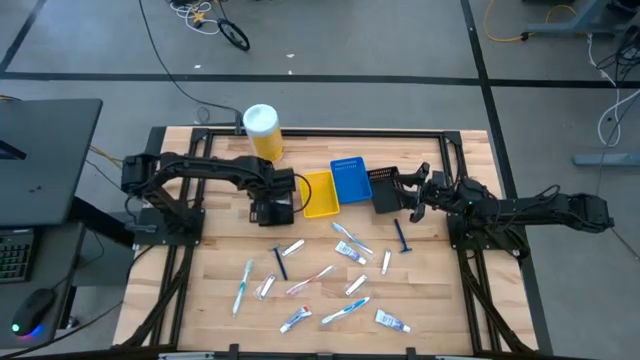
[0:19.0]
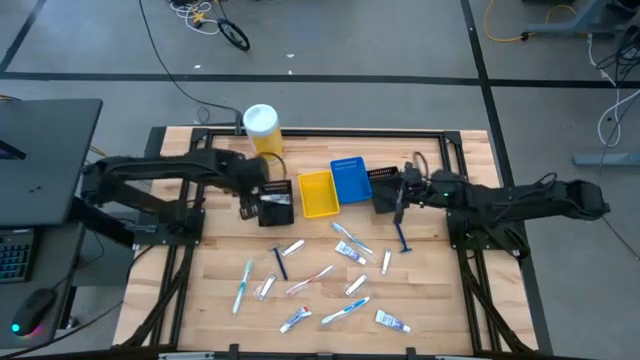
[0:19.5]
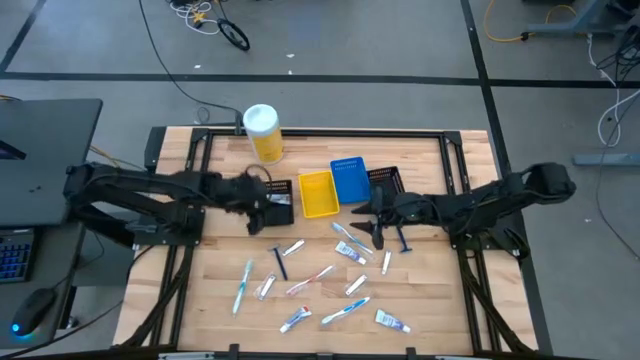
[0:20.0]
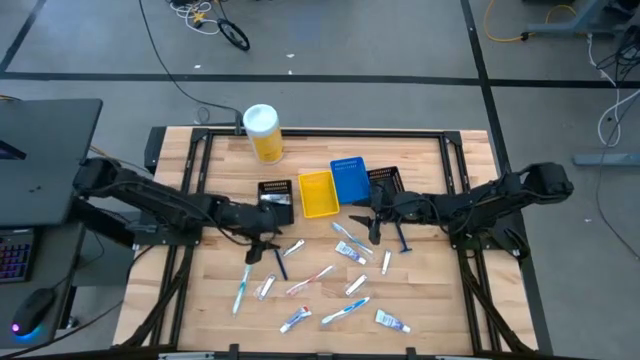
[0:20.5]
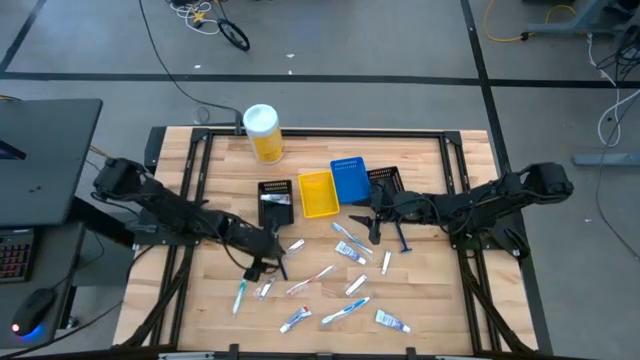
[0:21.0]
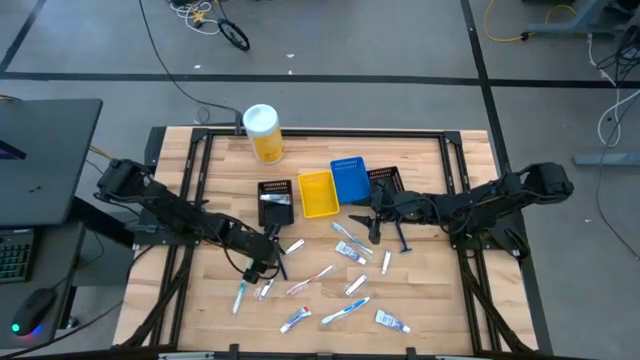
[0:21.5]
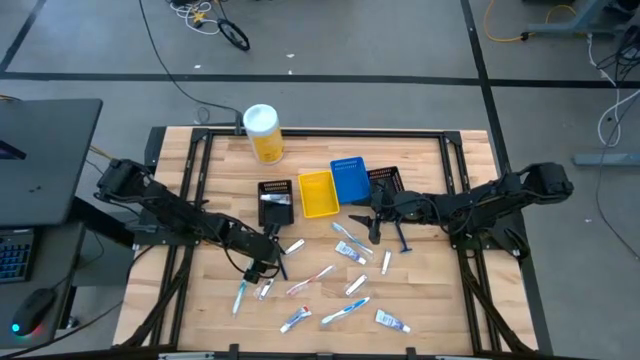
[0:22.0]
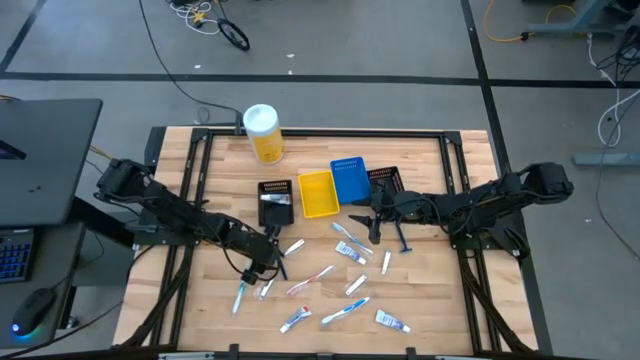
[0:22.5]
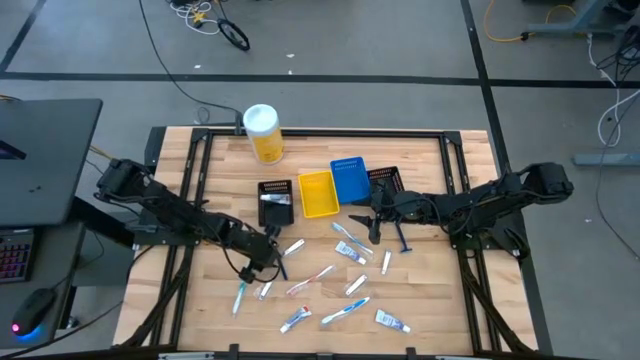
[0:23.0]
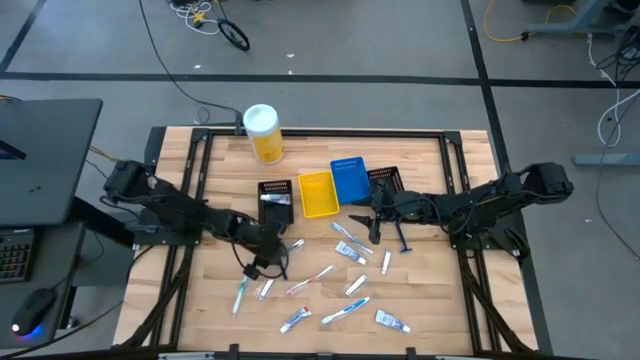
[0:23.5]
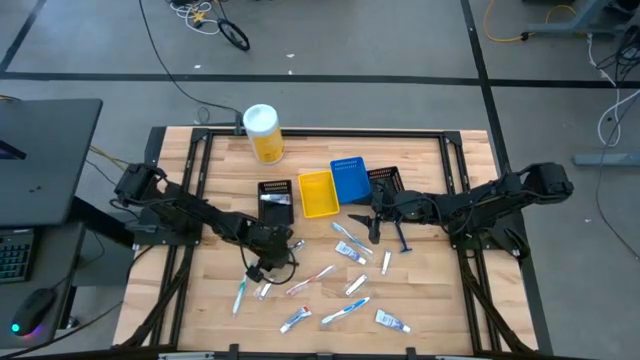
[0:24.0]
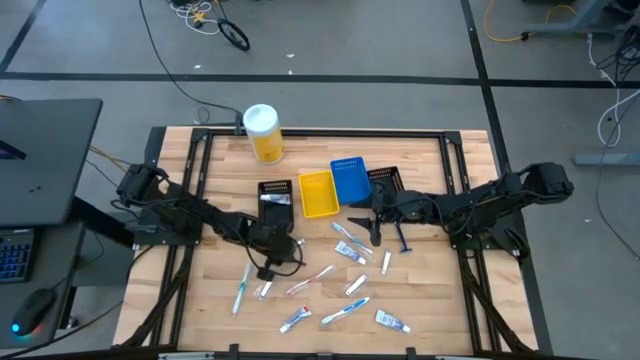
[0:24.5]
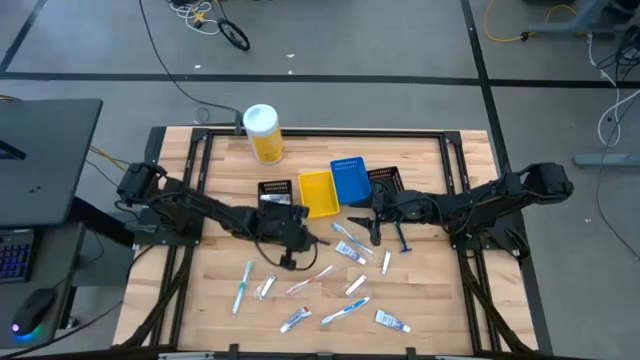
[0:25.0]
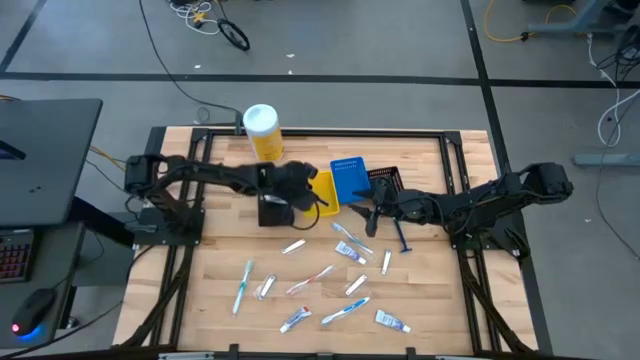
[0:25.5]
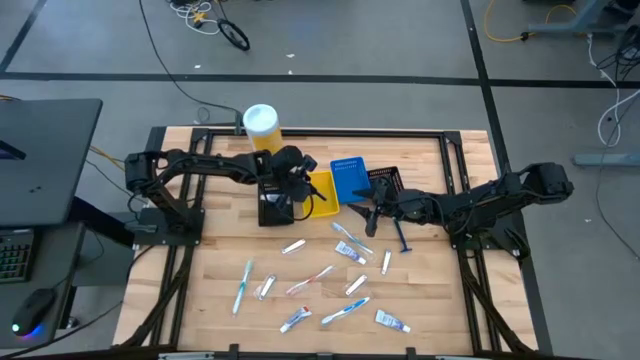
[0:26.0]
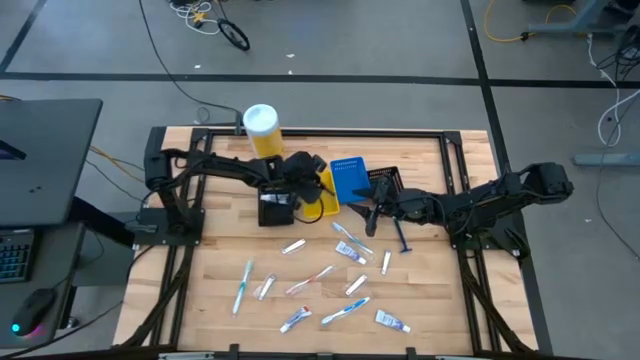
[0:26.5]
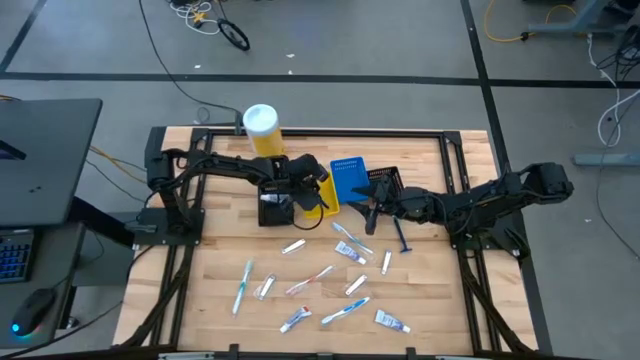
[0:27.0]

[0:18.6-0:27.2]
Task: Pick & Place Travel size toiletries
Put the blue razor into the yellow basket

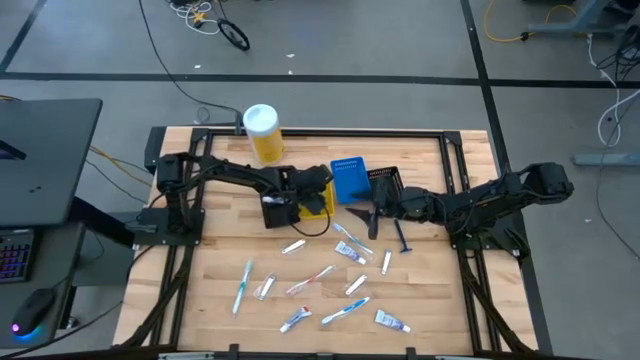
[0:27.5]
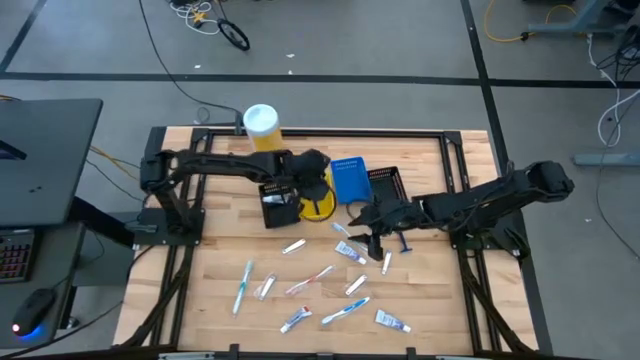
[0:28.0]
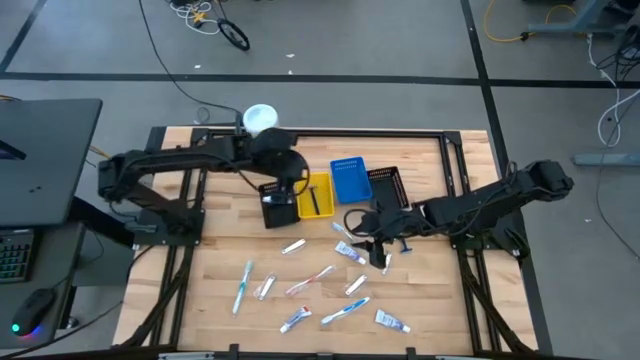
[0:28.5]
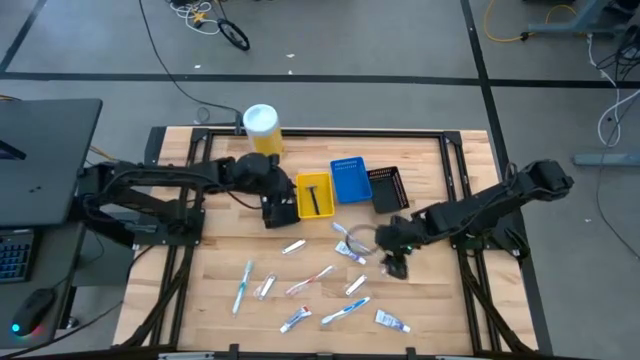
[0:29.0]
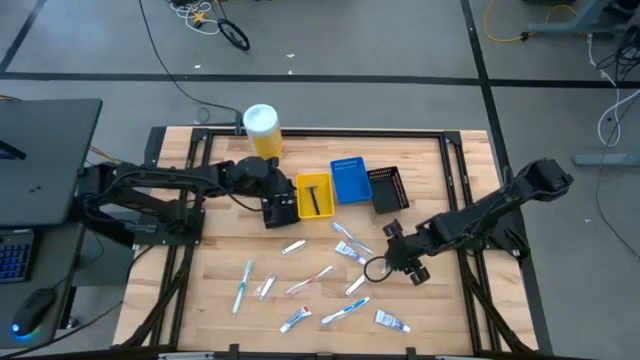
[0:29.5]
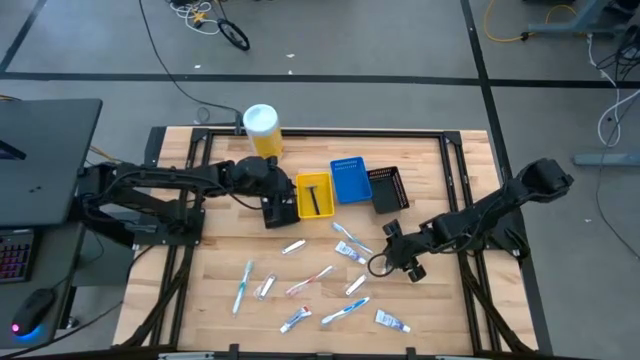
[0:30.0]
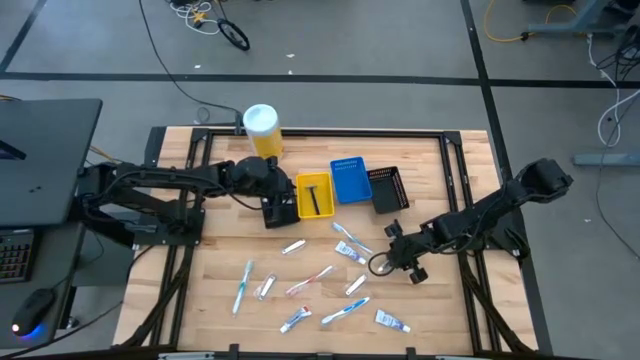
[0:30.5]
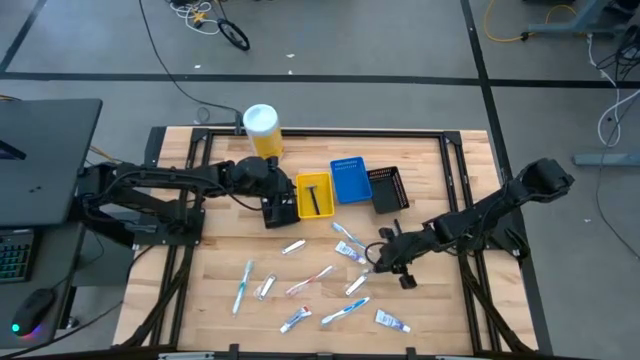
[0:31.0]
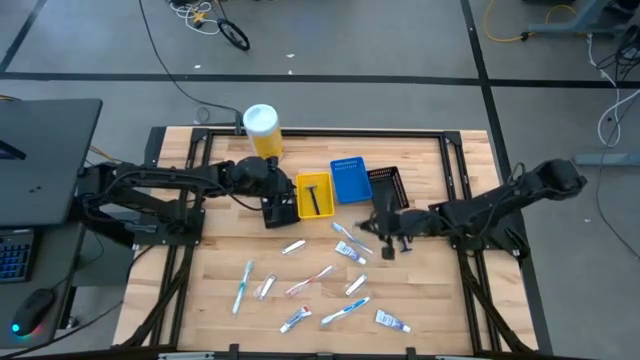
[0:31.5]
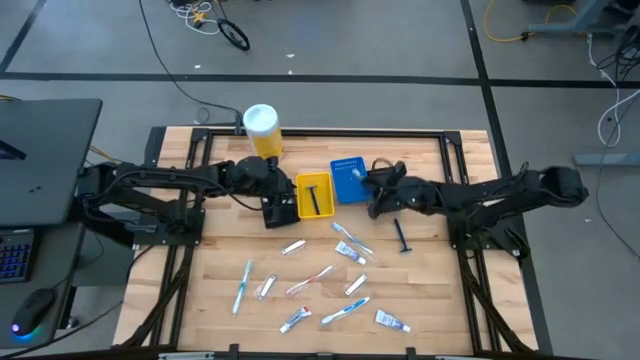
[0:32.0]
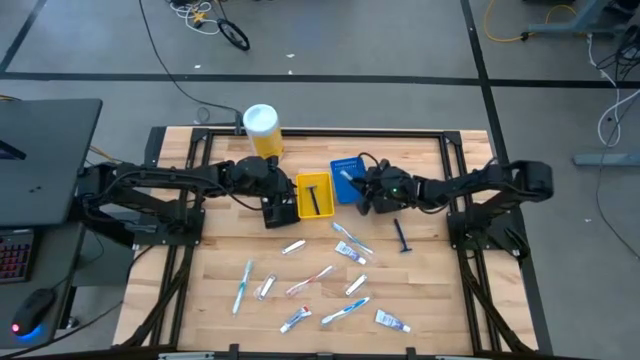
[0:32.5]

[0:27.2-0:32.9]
Put the silver nail cutter into the blue basket

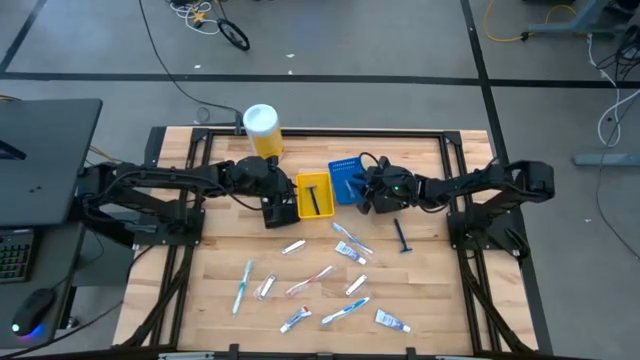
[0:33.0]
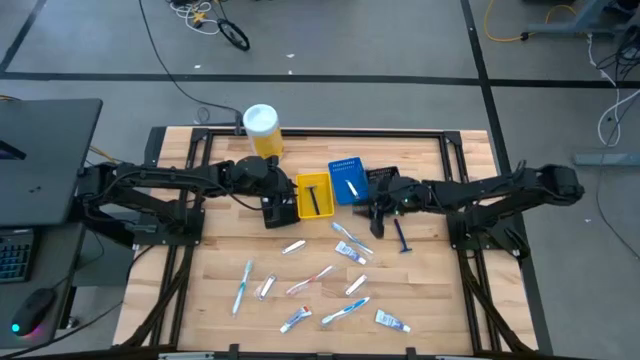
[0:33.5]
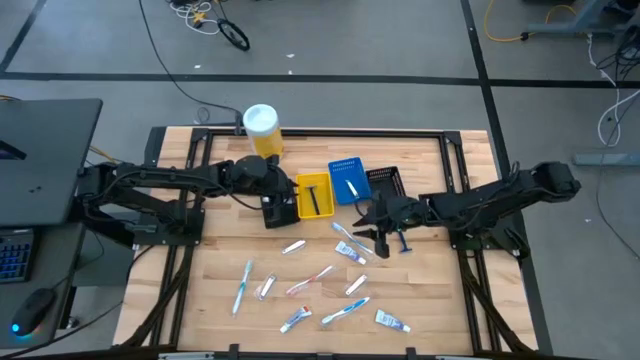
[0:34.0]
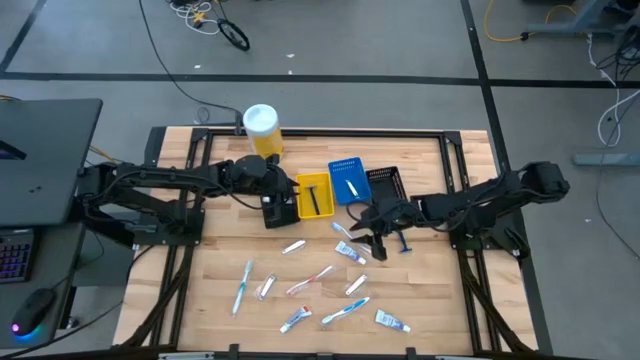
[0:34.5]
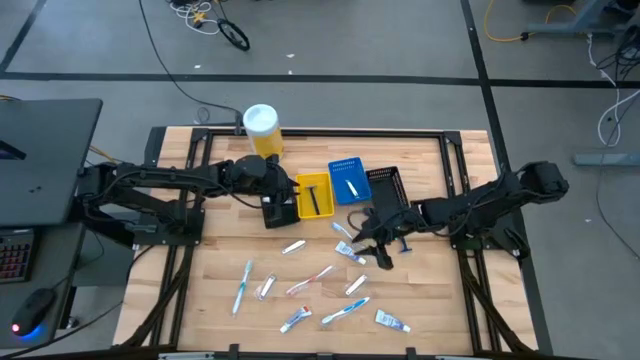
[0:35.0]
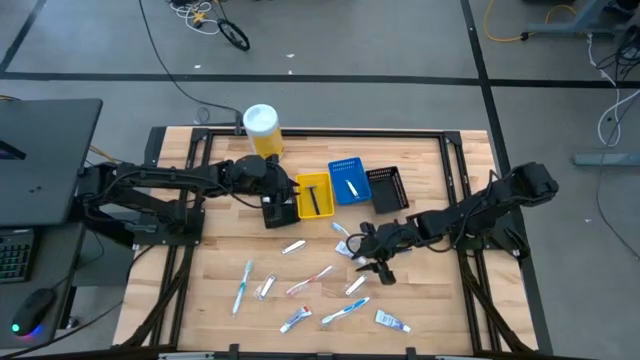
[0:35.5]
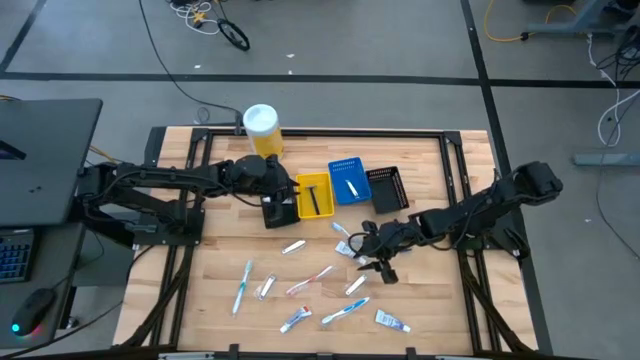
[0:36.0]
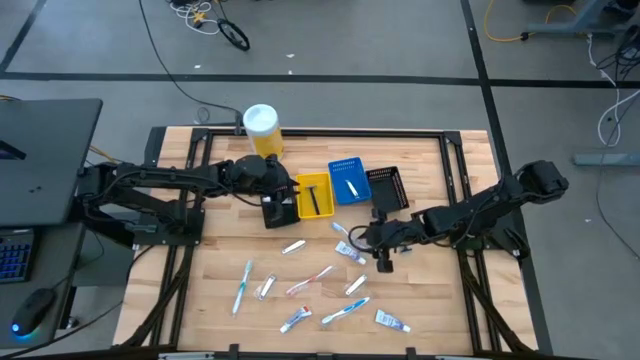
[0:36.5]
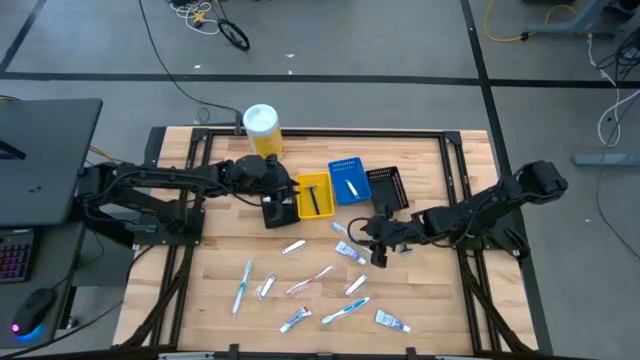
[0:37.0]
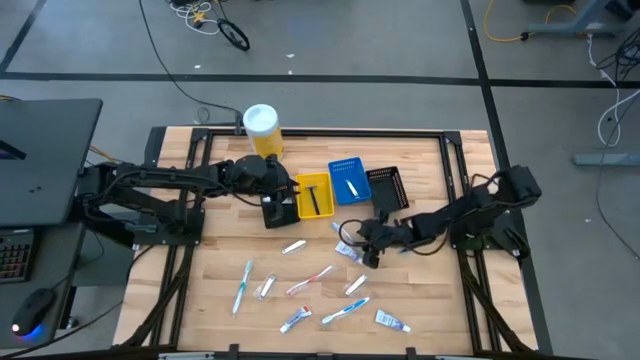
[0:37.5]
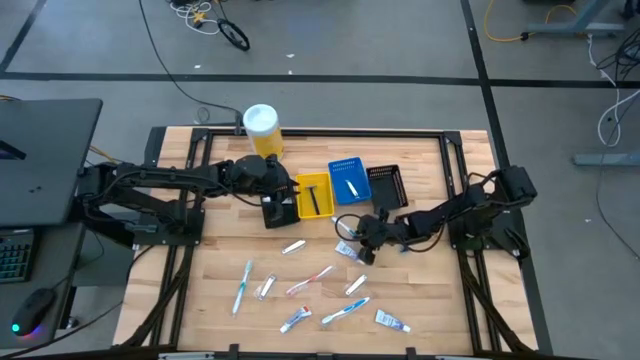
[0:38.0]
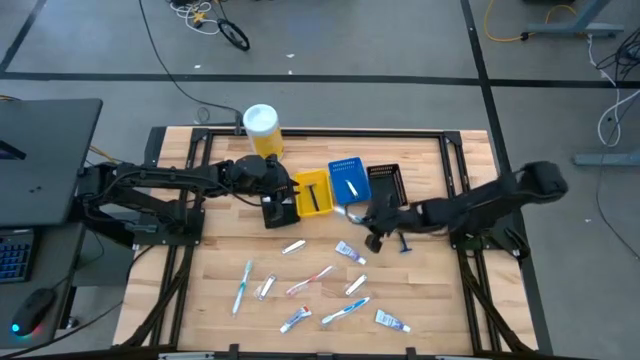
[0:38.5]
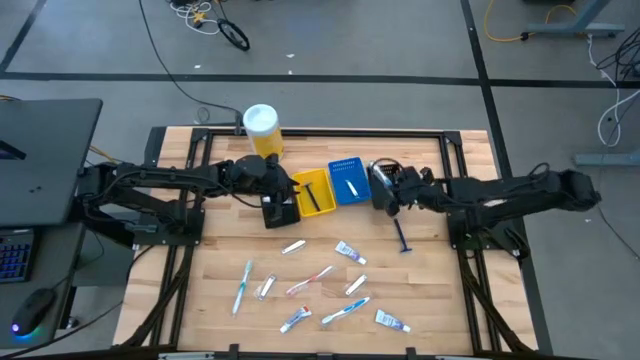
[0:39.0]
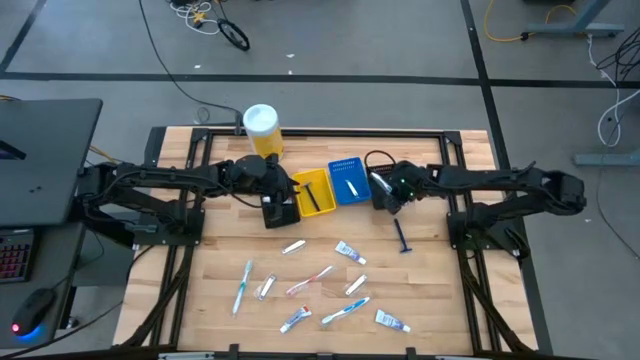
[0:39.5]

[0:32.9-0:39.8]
Put the blue toothbrush into the right black basket
